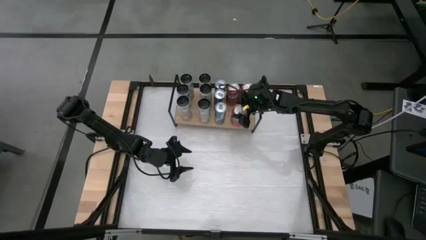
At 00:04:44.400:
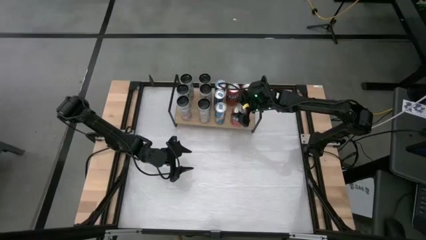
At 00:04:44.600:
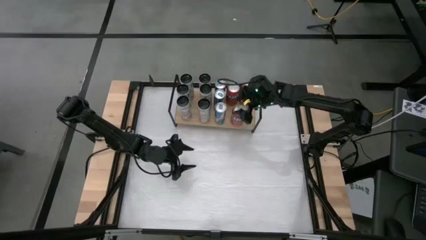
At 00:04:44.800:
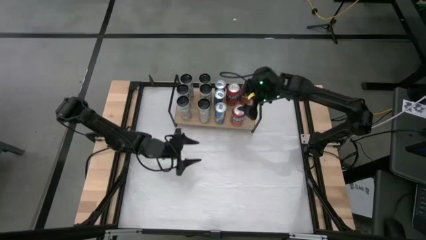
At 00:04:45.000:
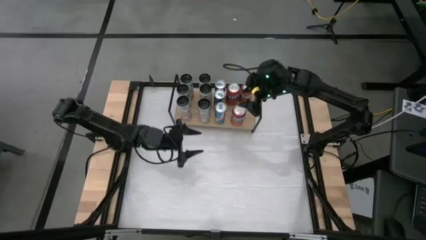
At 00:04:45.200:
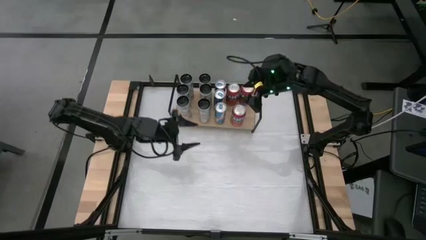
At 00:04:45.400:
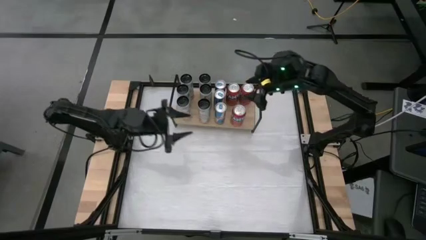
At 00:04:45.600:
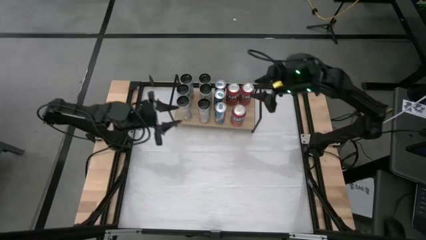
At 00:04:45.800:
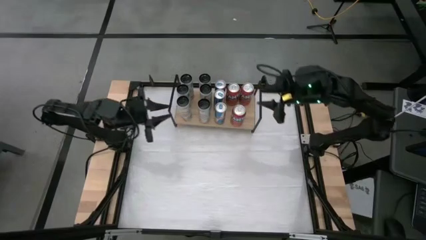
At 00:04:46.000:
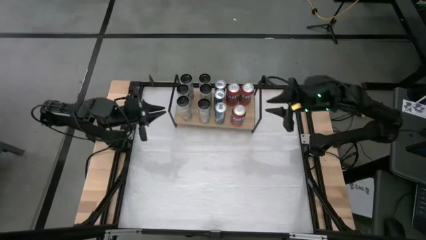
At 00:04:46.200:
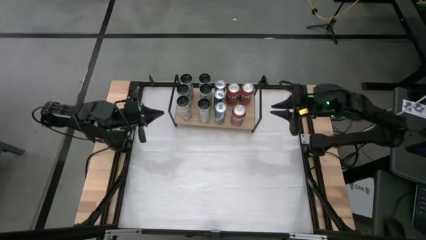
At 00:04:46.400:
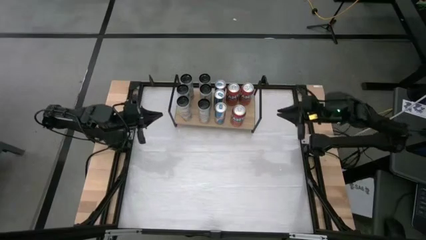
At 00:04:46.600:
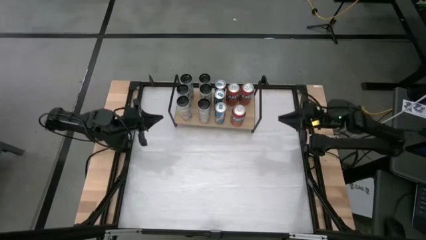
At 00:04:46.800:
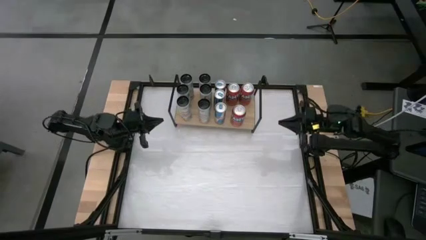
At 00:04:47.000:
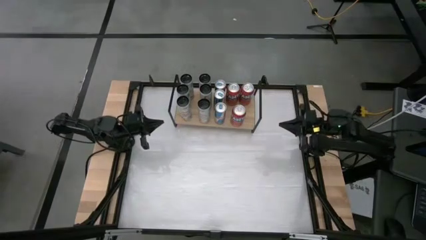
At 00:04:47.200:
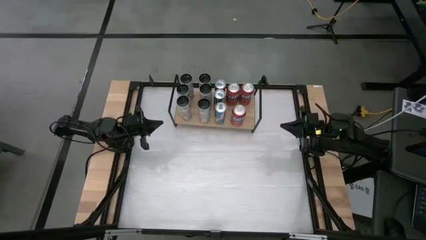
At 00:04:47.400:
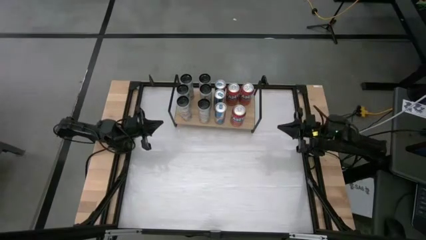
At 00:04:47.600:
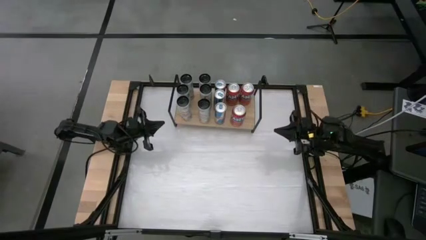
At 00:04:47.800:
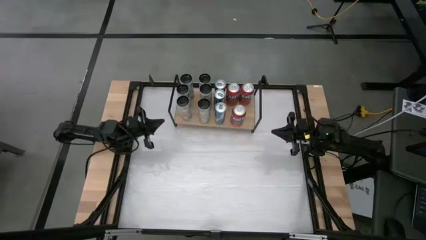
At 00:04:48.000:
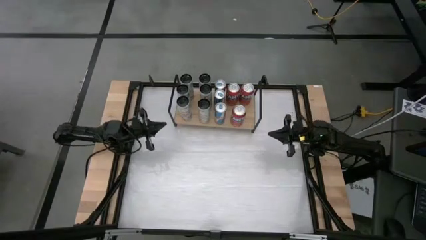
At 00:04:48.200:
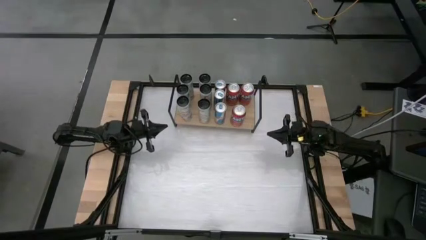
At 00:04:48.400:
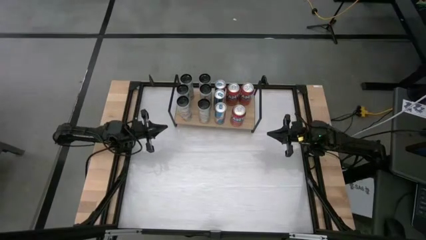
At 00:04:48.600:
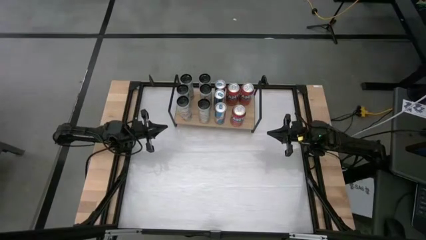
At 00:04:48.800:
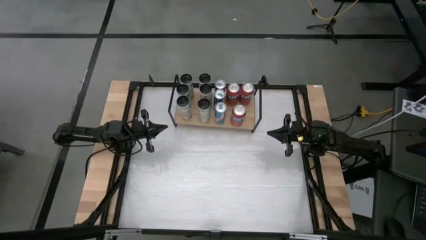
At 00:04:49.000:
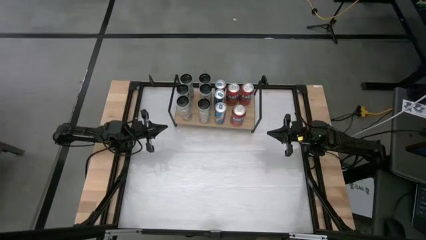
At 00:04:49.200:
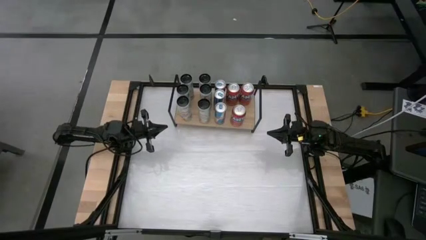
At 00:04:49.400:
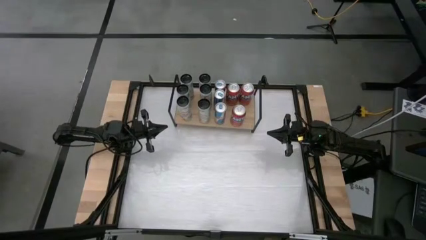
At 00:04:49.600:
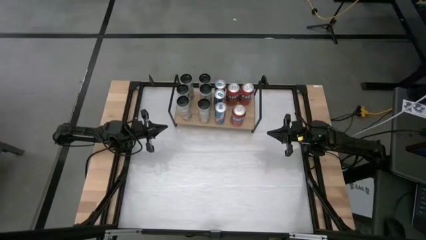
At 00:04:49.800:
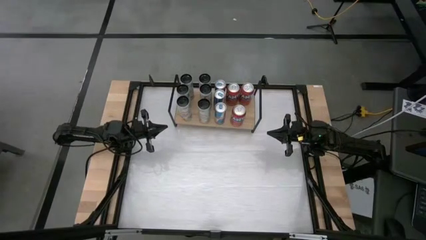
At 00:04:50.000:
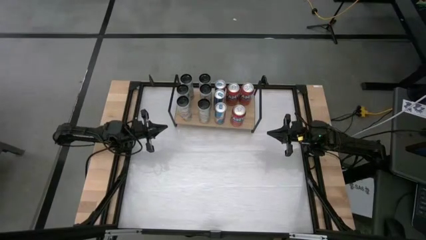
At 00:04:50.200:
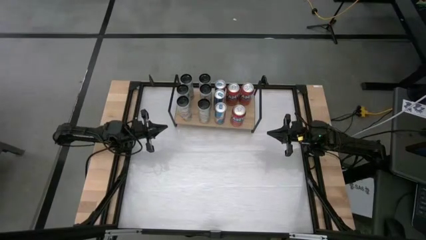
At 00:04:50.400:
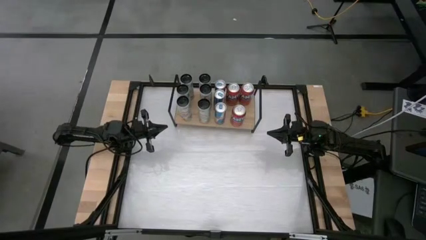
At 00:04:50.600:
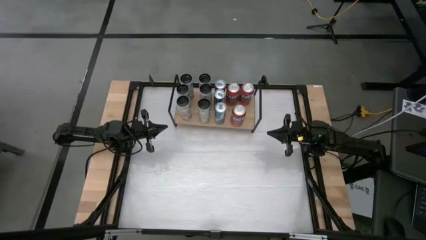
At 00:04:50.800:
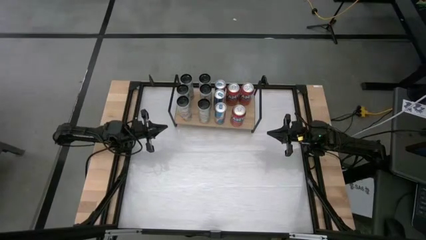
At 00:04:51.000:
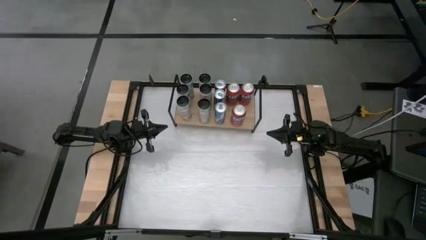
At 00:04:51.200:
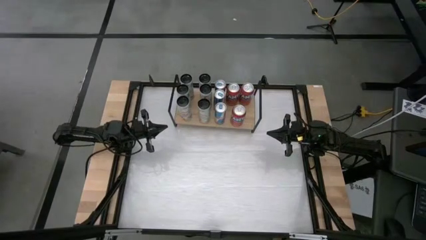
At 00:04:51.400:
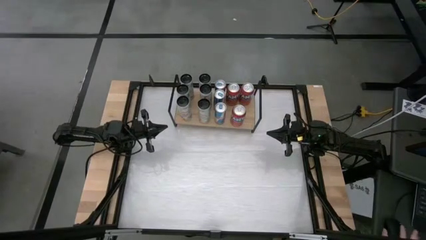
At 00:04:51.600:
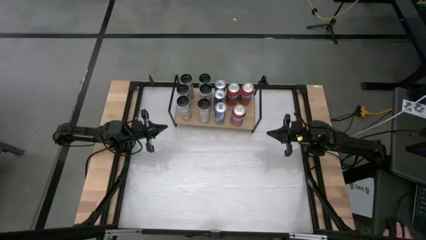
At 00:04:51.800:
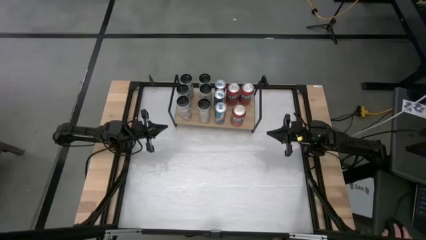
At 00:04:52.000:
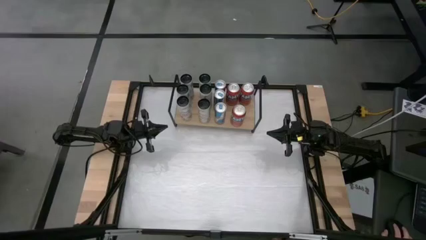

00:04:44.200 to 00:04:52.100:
Task: Place canned beverage on shelf
Return to Home Position

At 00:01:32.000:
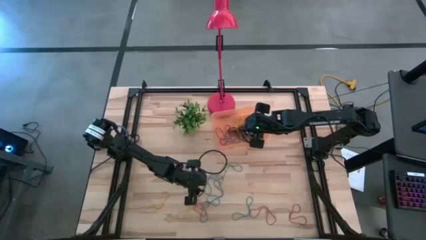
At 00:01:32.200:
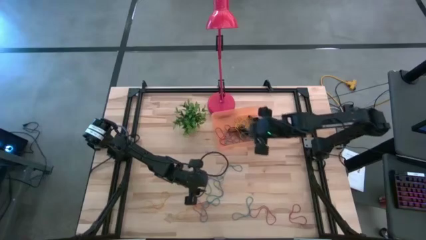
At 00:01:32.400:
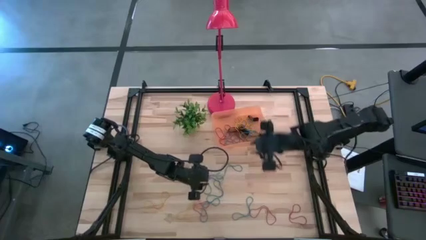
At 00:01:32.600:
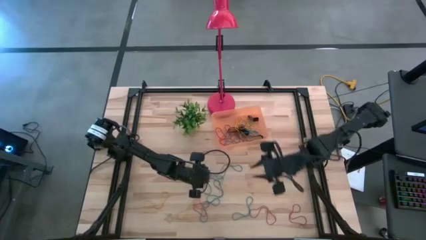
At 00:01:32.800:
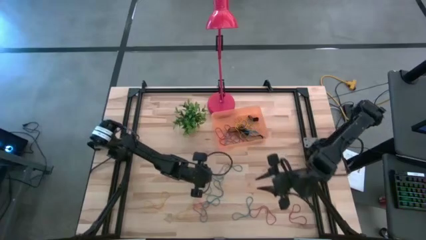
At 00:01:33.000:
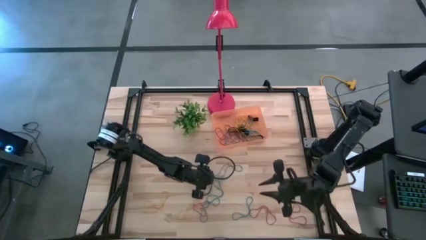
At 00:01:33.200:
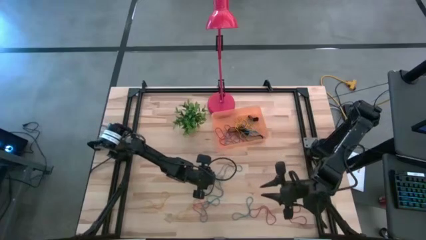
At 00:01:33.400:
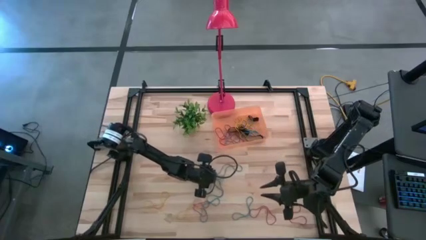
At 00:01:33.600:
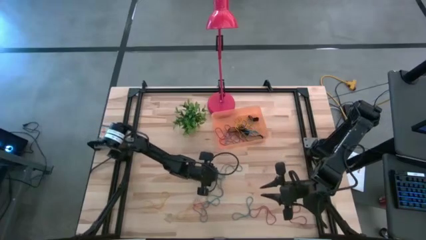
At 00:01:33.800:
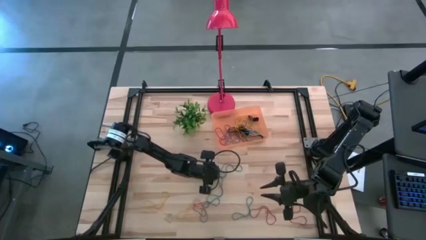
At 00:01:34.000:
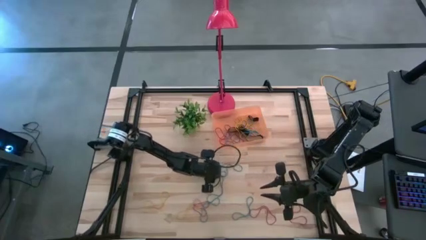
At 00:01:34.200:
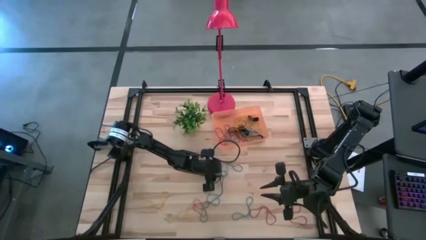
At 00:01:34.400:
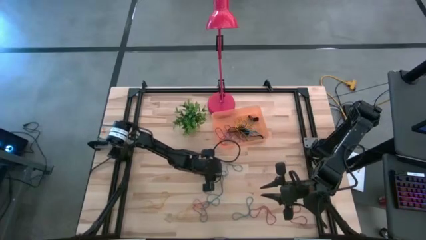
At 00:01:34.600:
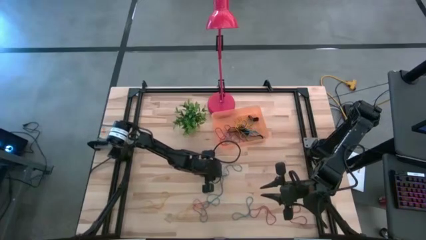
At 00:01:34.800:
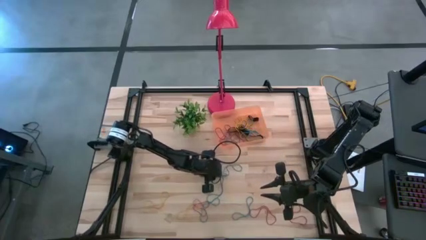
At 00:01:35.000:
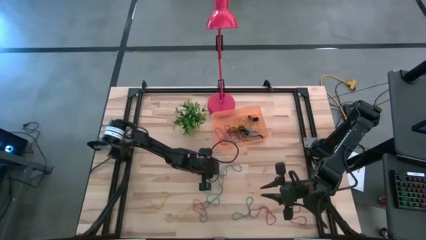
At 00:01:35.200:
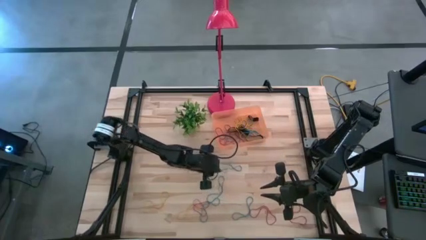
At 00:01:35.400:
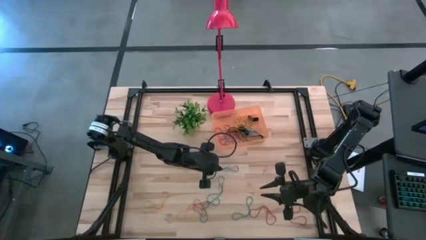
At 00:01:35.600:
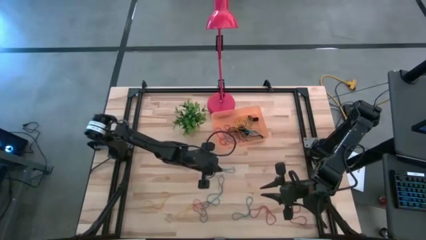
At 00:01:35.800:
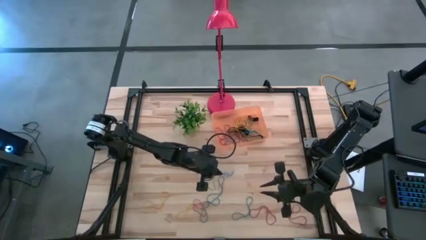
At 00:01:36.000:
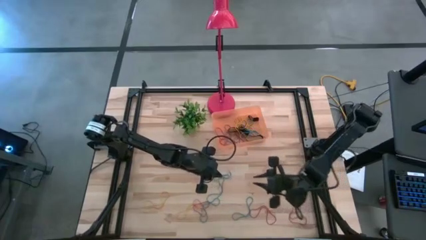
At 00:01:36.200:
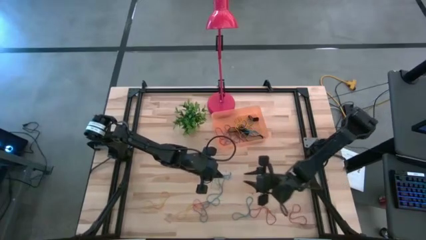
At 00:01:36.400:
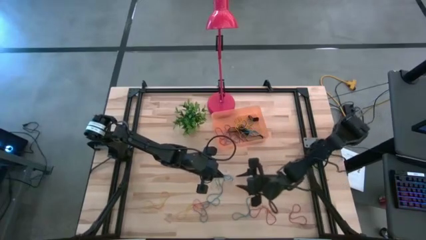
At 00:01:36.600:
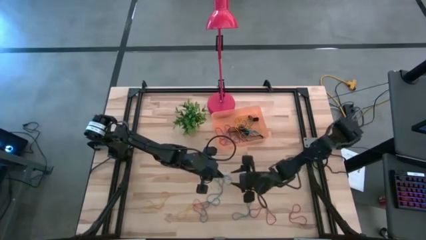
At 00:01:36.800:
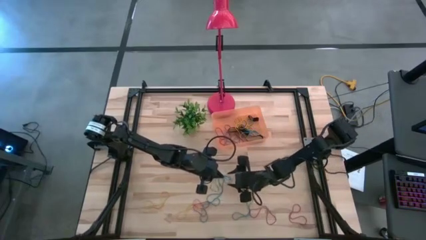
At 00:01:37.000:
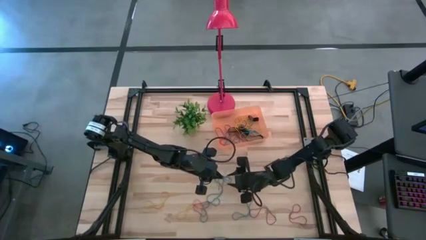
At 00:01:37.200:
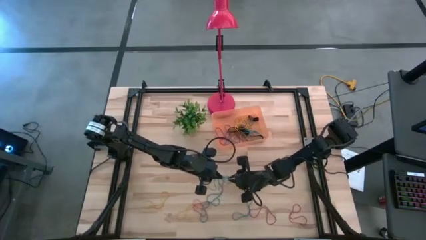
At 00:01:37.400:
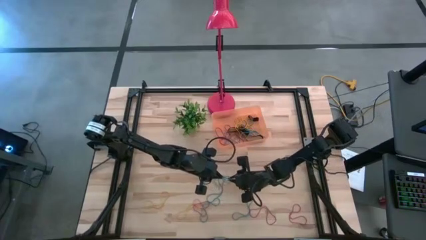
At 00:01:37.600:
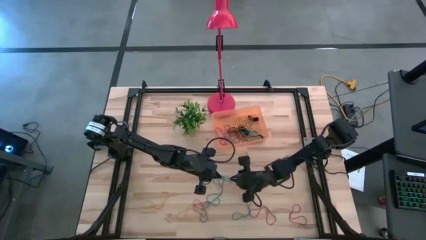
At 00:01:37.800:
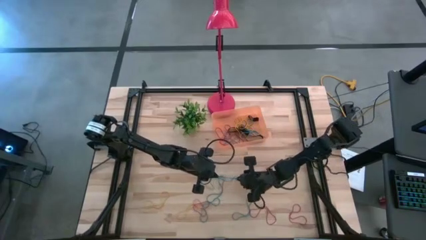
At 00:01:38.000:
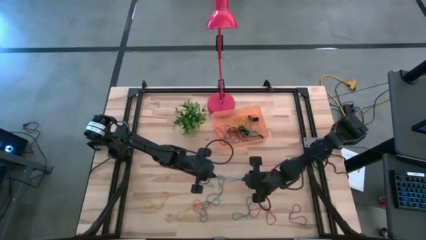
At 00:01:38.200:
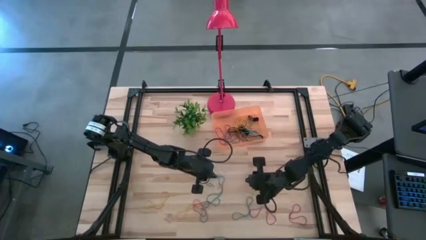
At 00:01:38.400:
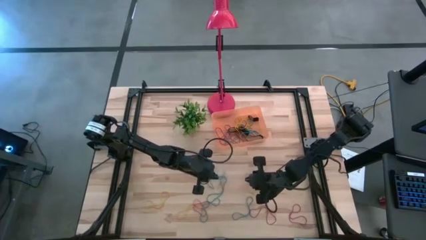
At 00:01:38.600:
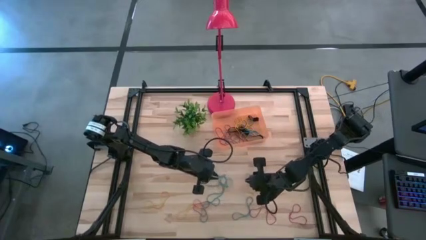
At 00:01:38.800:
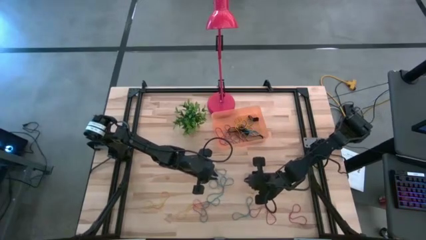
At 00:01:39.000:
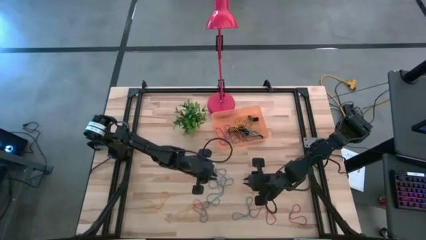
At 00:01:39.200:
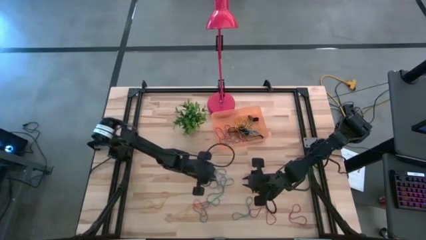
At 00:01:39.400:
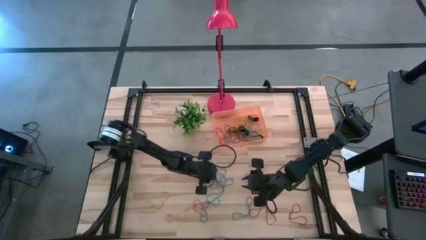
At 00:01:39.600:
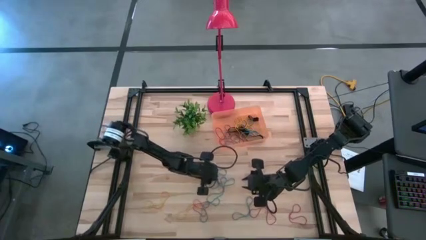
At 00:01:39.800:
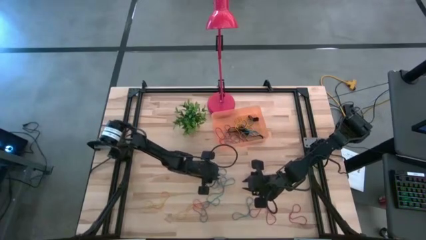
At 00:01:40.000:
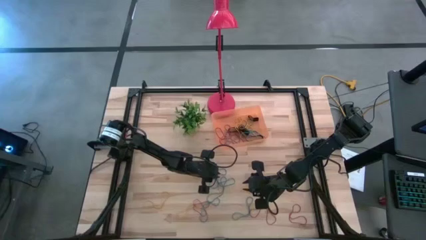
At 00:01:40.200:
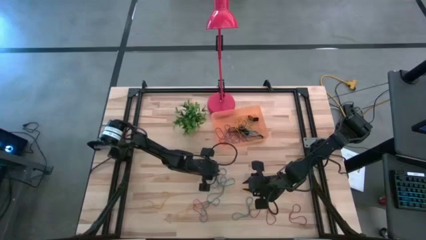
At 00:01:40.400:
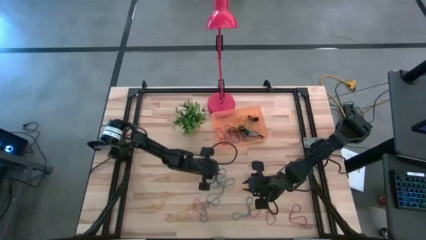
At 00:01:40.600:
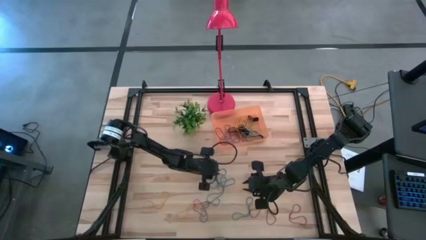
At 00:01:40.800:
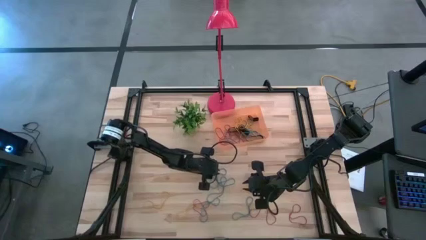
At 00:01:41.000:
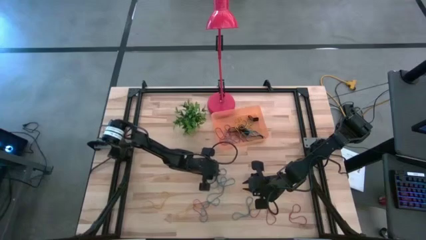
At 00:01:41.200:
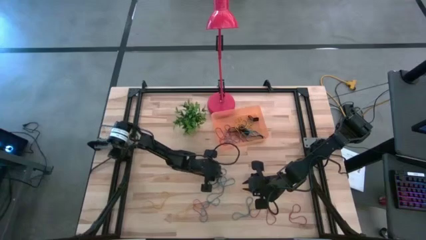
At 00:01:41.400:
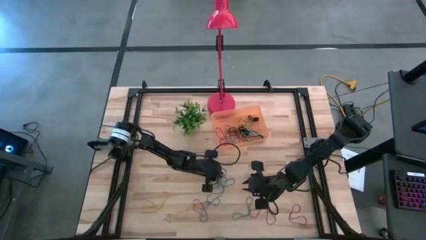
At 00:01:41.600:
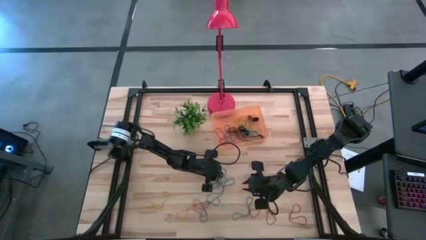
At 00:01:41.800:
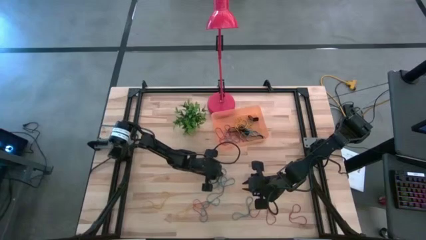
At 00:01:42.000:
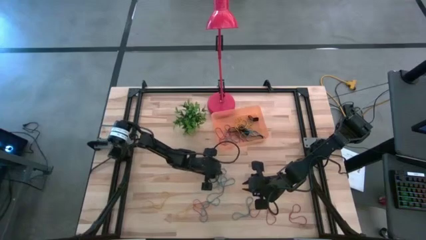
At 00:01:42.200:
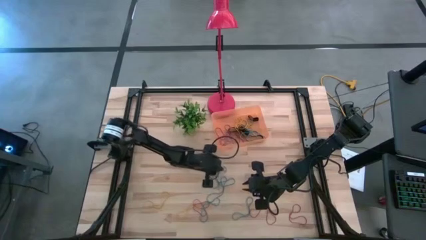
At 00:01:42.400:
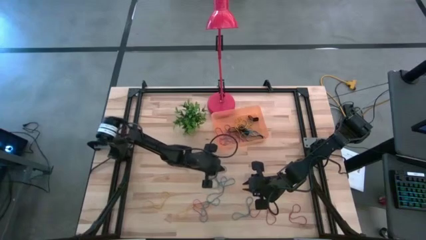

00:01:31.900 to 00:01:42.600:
Task: Pick and place rubber bands into bin
Put the blue rubberband into the orange container
